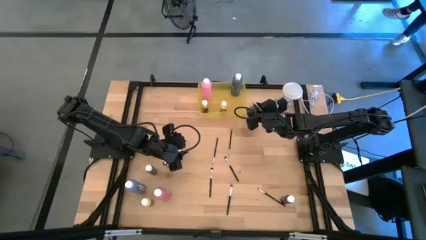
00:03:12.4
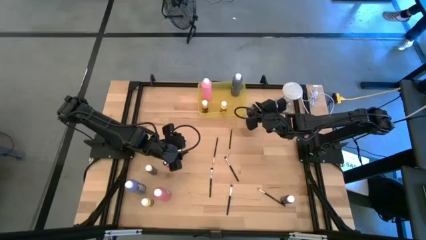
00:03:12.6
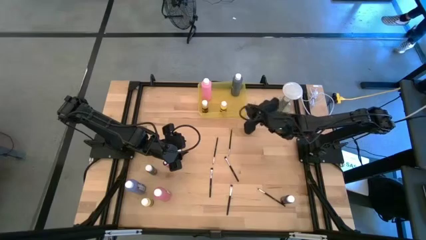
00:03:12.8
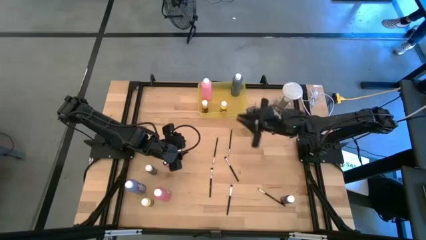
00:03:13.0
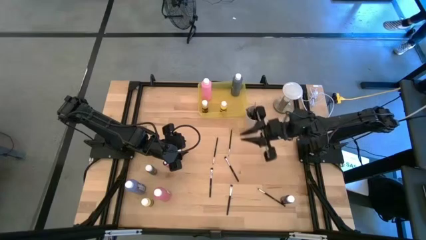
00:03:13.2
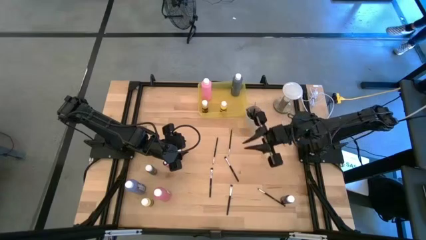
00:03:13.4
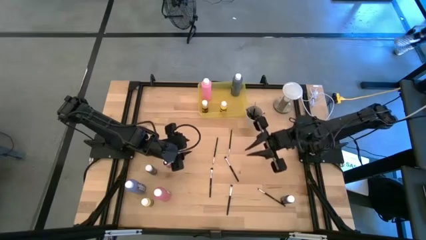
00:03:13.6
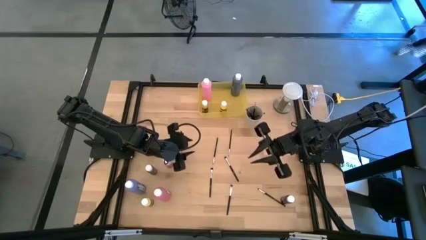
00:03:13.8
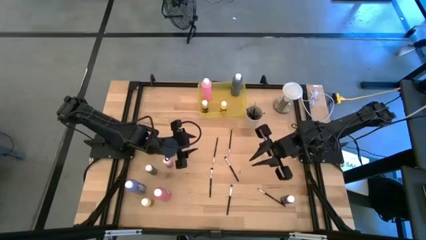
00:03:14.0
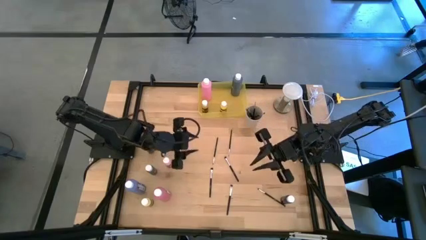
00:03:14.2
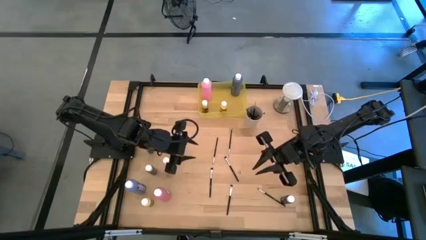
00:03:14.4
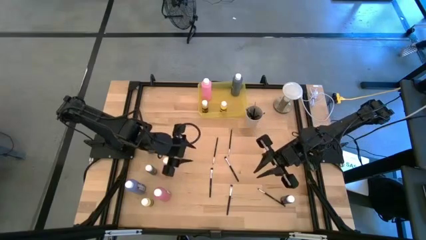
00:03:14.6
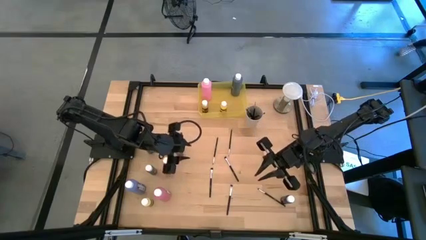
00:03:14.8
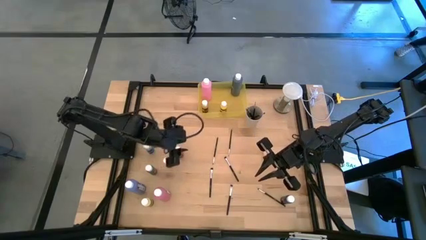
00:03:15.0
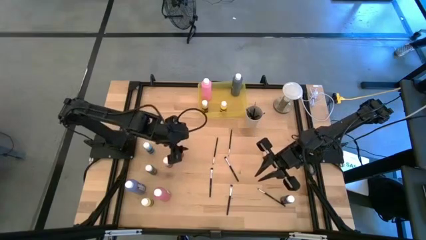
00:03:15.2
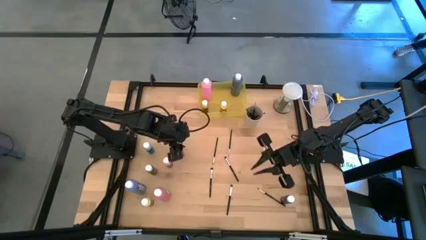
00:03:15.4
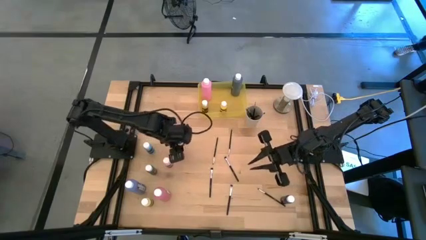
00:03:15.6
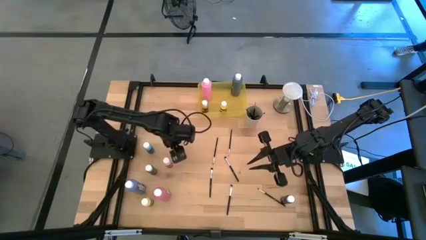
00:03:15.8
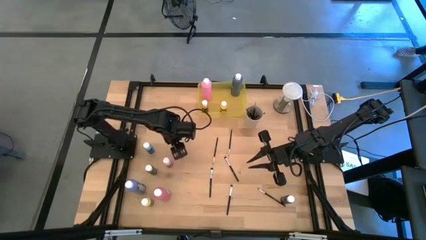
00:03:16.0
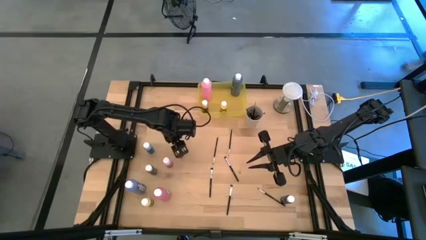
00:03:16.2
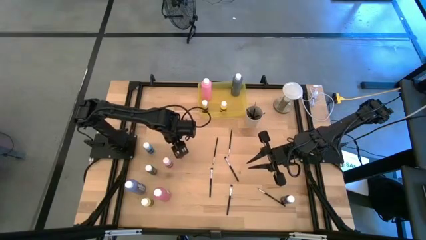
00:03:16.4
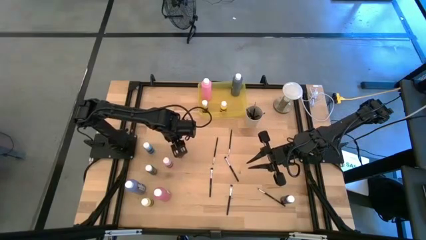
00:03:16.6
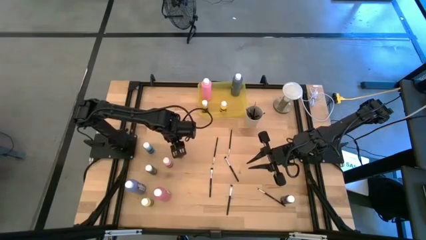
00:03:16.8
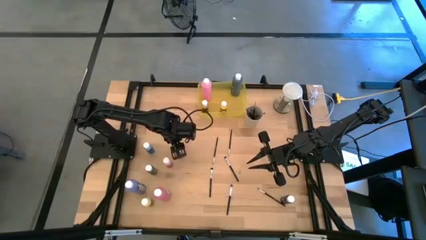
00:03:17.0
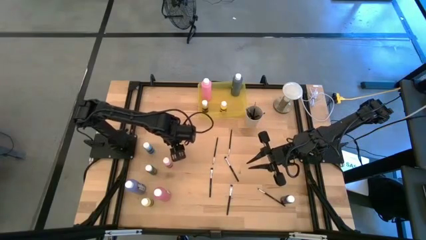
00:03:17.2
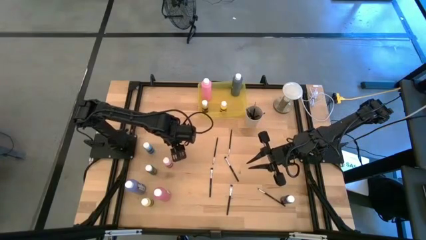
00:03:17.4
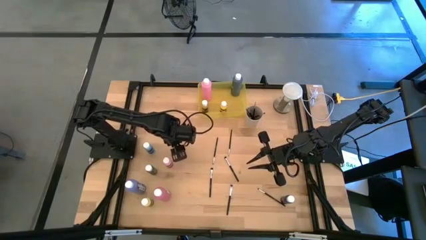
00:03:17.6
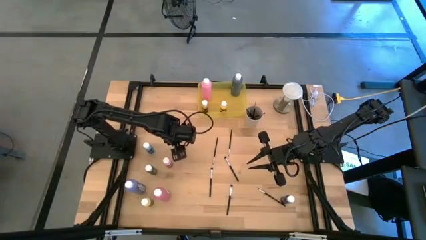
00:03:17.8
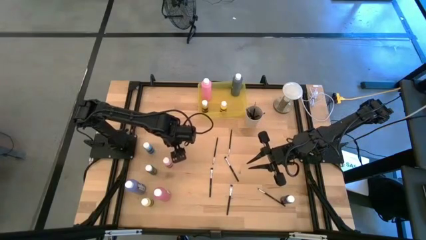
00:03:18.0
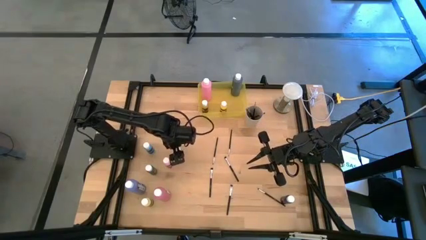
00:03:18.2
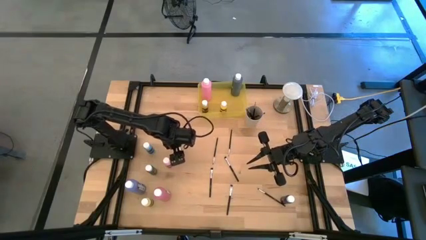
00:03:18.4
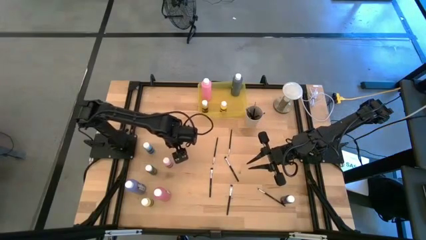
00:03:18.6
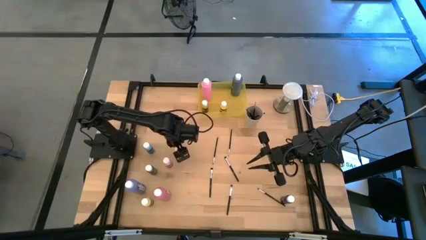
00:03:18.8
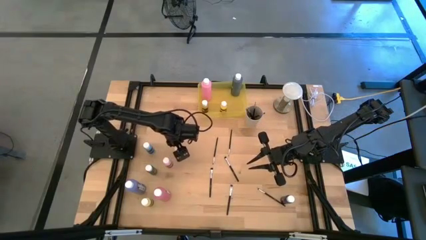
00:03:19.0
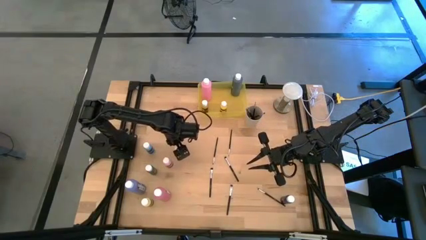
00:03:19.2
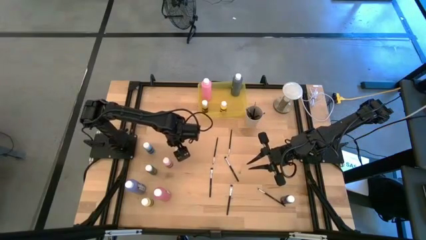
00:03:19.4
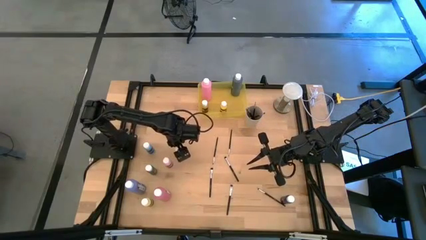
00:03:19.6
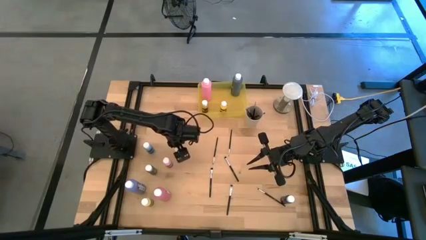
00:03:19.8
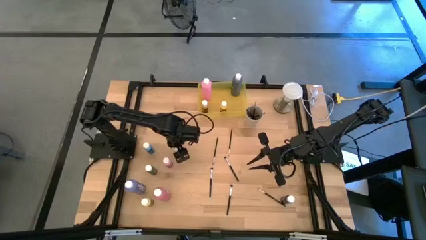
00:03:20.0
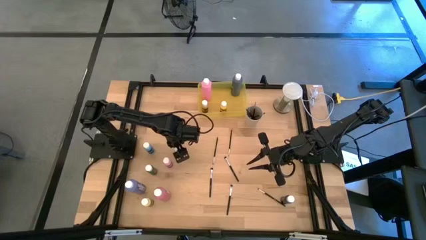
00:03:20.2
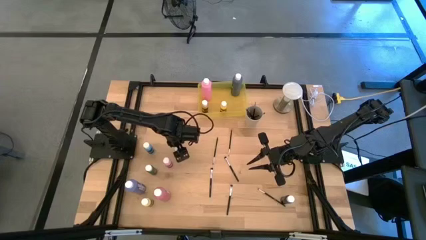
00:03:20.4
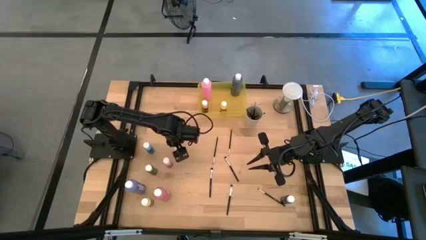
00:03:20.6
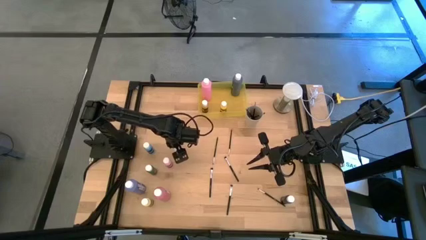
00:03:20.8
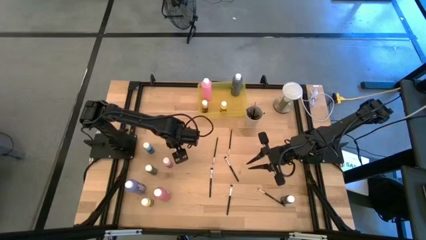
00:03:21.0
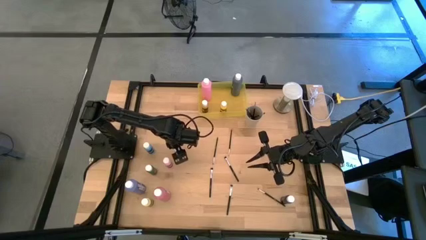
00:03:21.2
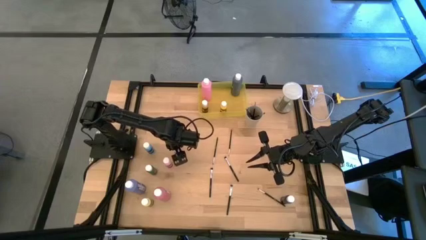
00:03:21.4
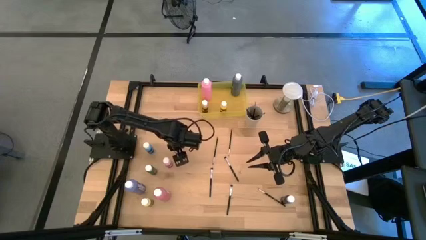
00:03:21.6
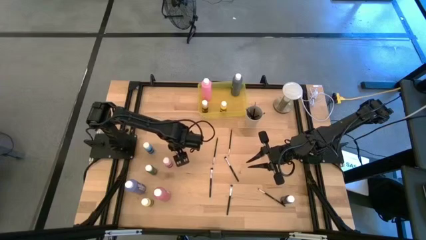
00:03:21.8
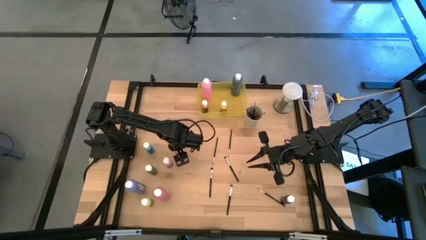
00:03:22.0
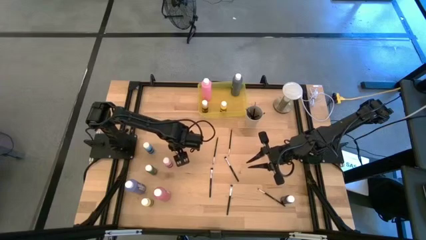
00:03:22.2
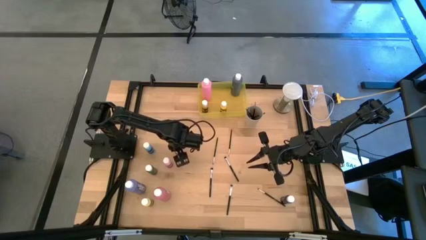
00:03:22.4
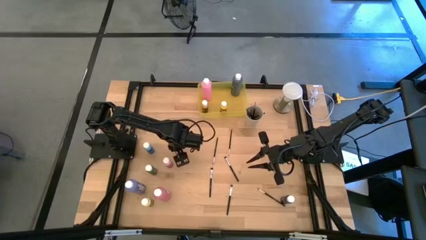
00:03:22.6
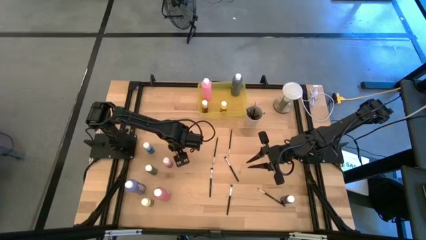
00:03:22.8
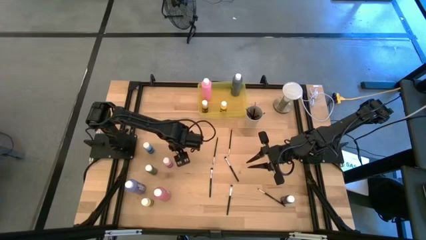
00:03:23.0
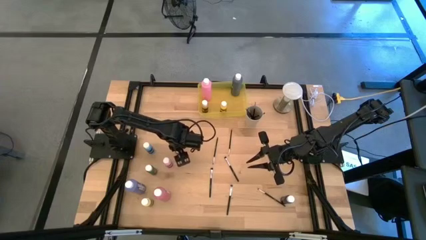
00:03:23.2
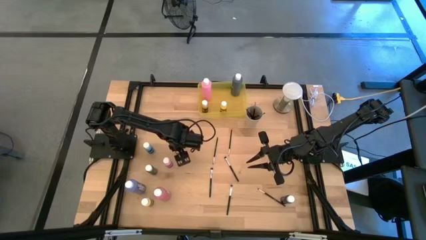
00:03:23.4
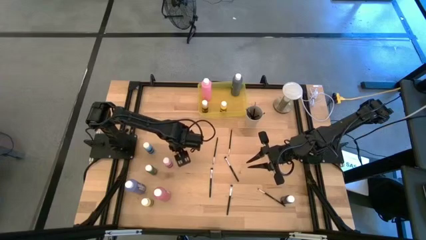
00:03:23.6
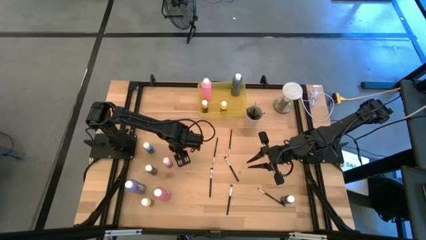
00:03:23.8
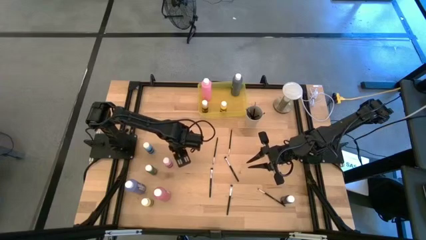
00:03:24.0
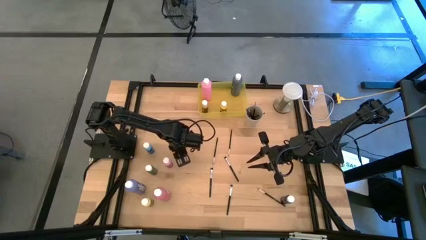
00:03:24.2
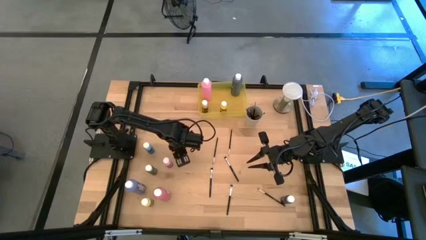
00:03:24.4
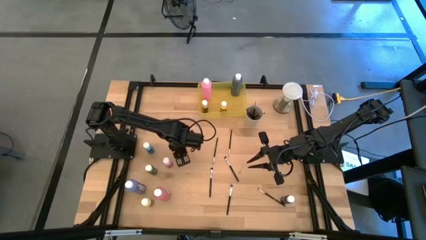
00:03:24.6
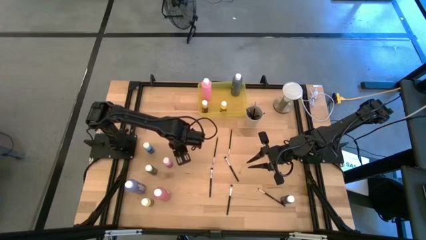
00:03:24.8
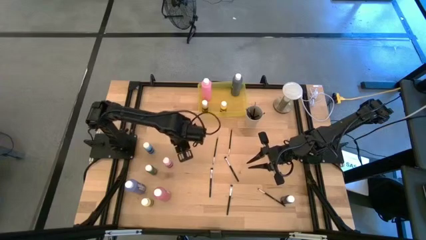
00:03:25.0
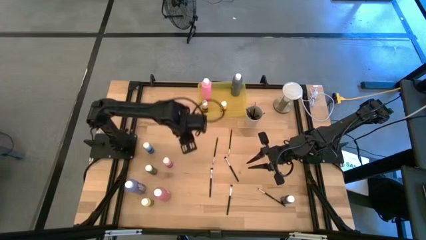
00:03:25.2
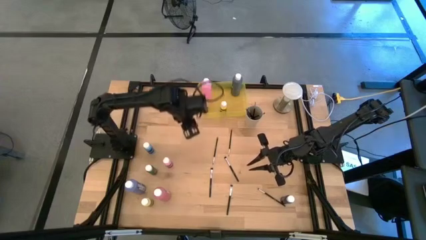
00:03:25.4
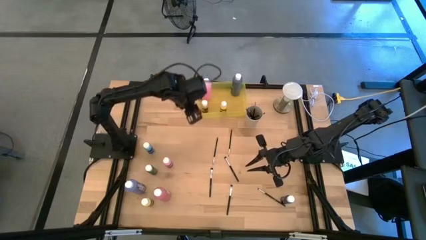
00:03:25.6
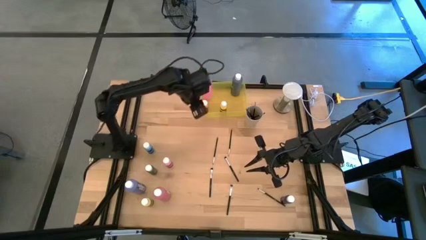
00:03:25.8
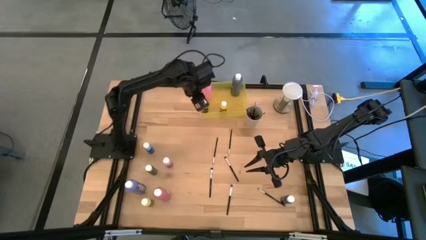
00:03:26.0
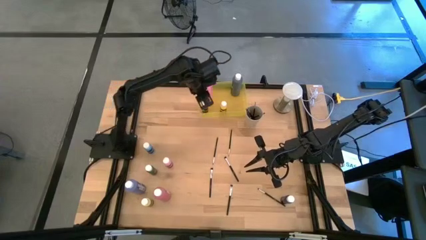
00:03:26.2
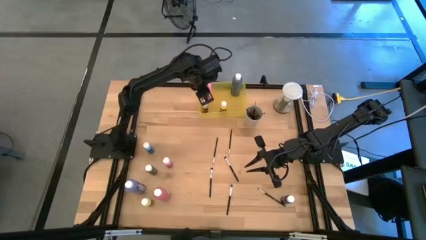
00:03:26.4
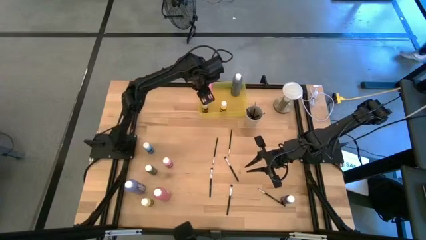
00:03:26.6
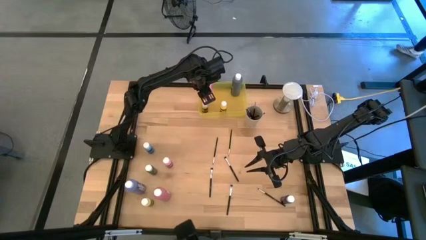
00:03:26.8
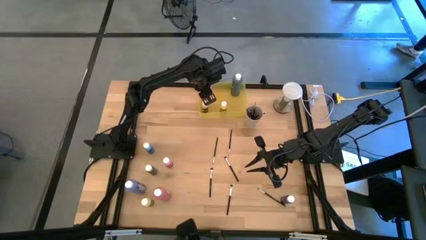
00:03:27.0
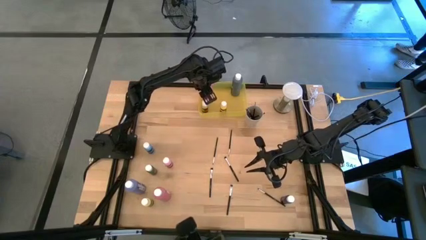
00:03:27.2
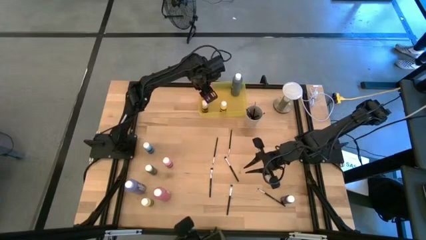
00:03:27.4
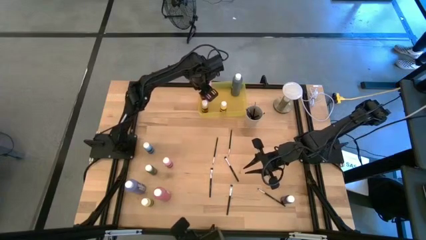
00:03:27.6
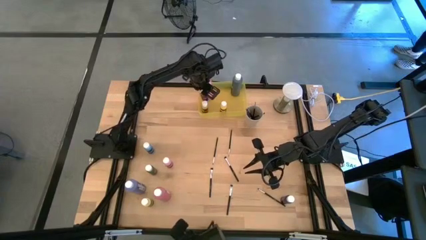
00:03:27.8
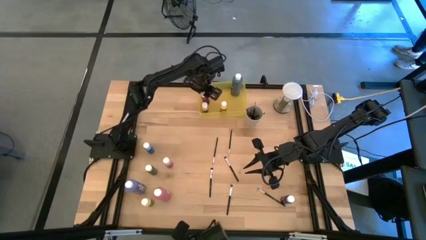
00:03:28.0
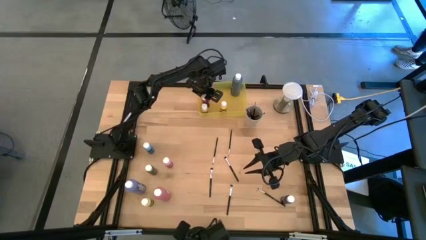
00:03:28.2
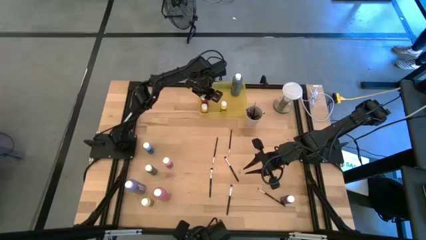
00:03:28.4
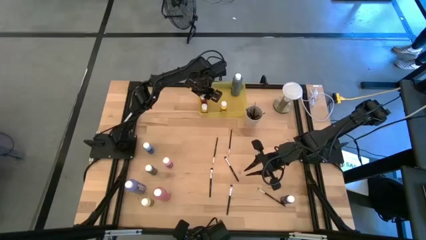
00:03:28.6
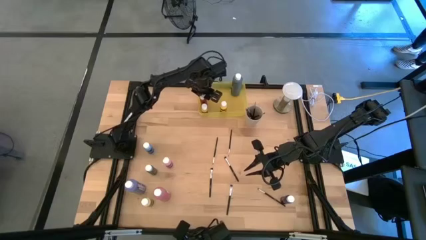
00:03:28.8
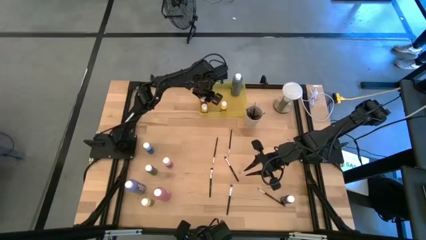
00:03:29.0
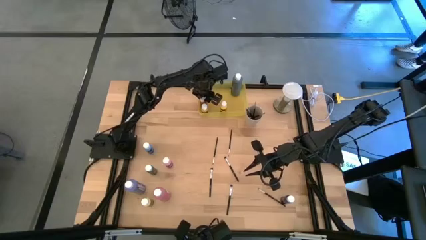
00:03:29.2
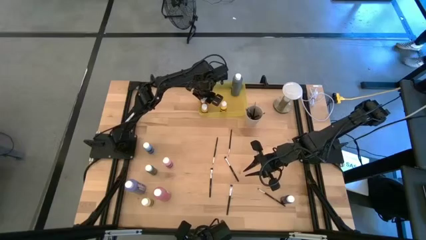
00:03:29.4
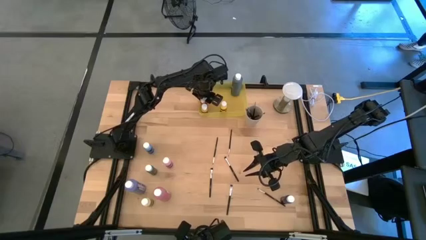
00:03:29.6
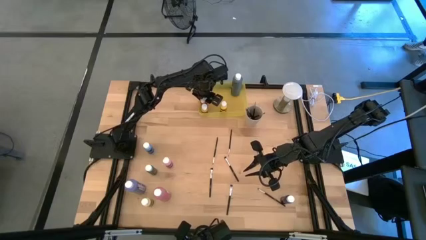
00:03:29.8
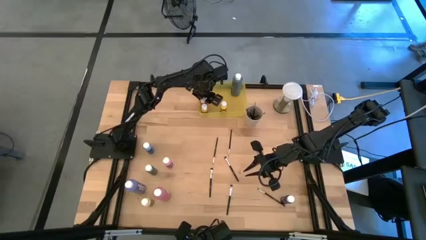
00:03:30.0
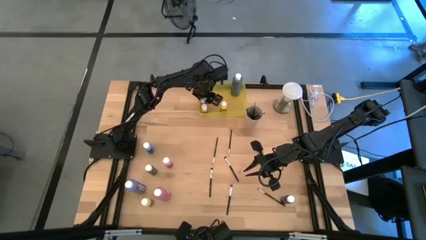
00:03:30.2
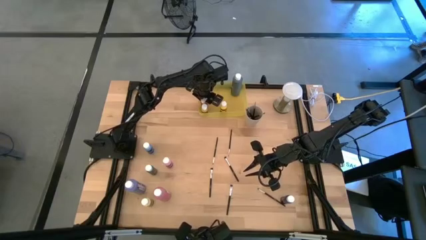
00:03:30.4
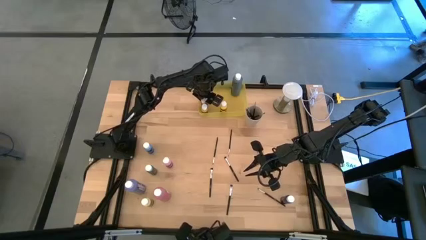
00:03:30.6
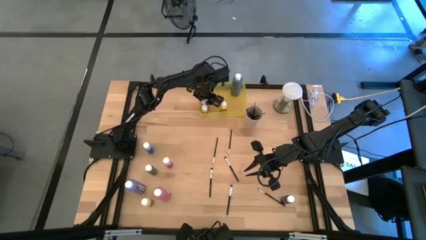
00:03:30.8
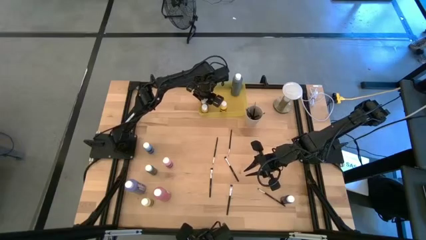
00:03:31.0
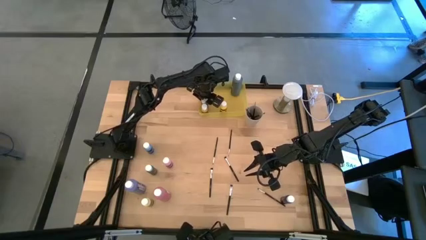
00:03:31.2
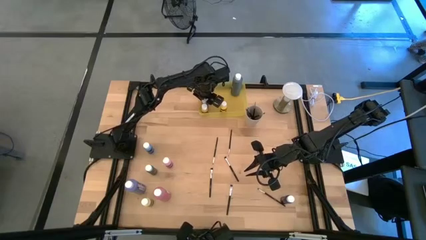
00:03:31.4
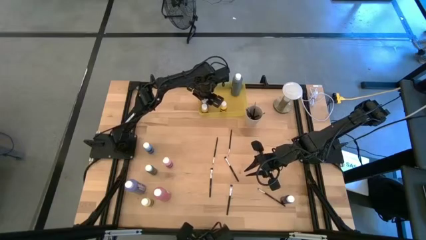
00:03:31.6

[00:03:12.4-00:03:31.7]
Task: Pick & Place Paint Supplies
Put the small red paint bottle into the yellow bin
